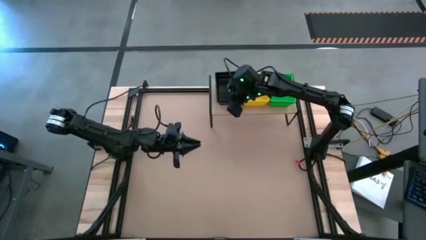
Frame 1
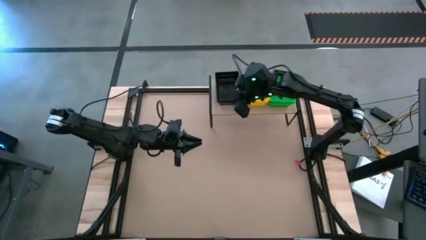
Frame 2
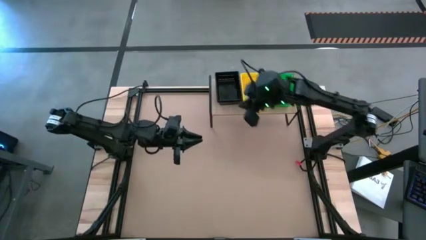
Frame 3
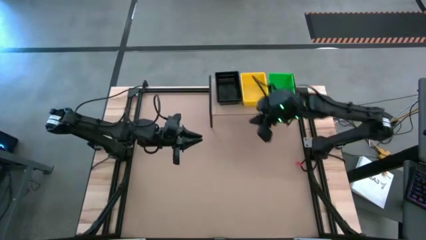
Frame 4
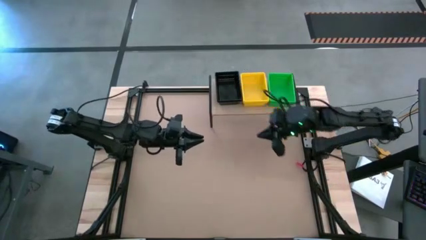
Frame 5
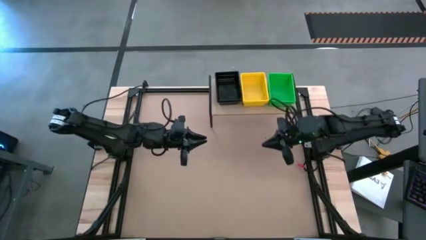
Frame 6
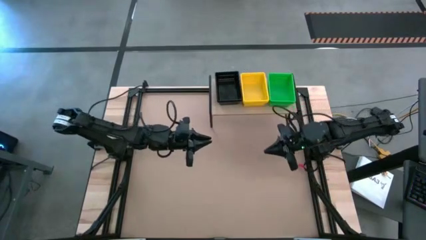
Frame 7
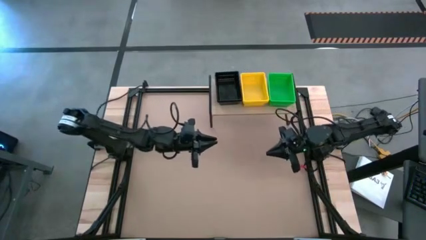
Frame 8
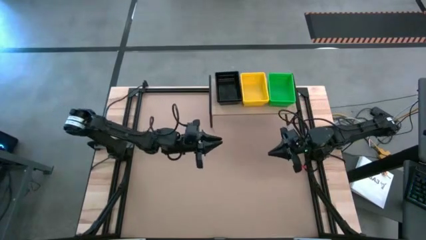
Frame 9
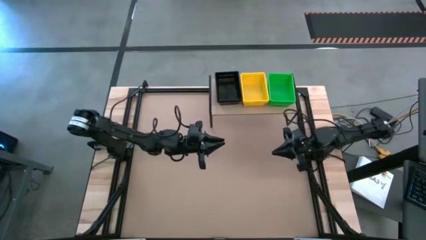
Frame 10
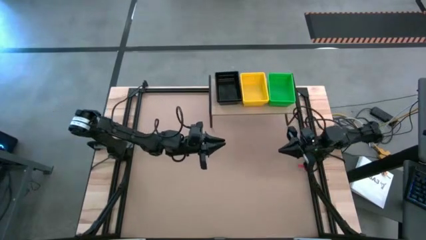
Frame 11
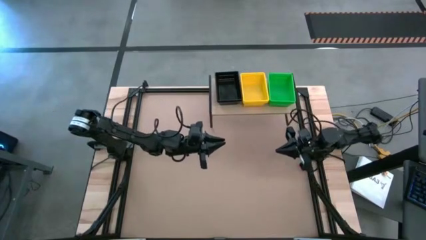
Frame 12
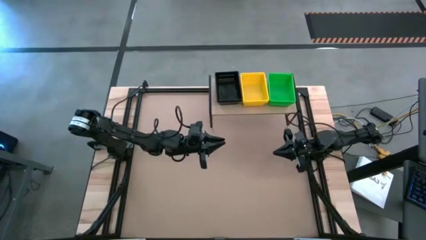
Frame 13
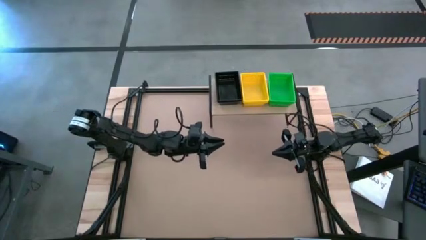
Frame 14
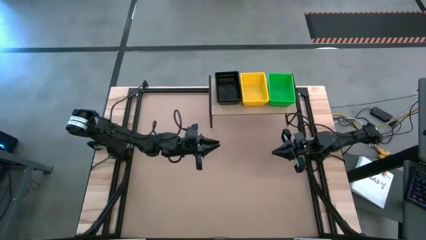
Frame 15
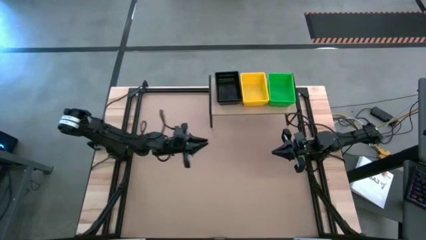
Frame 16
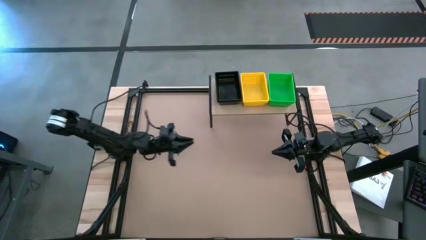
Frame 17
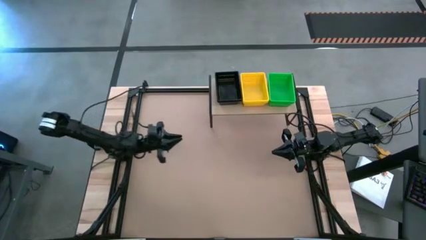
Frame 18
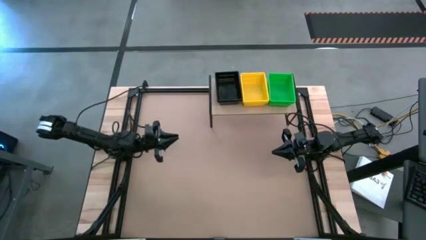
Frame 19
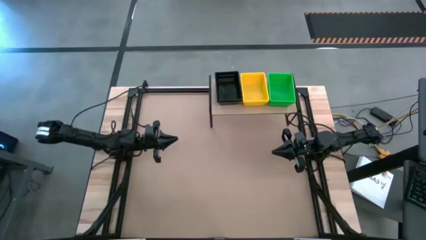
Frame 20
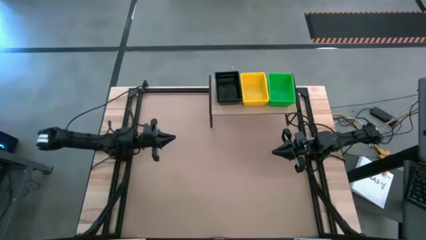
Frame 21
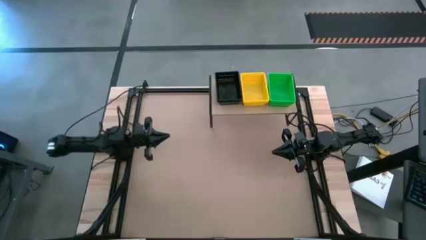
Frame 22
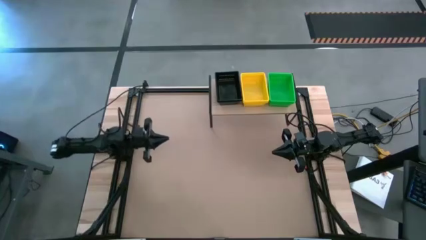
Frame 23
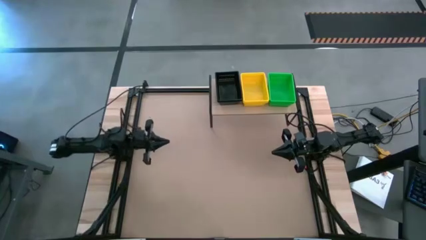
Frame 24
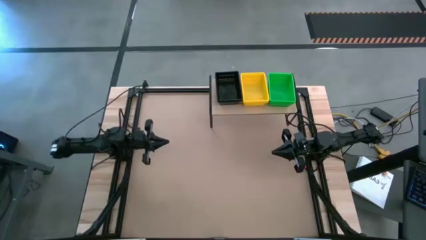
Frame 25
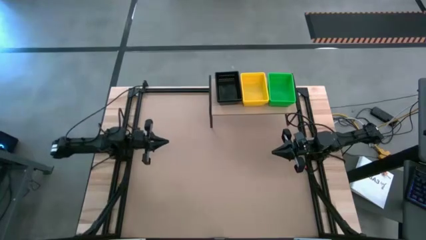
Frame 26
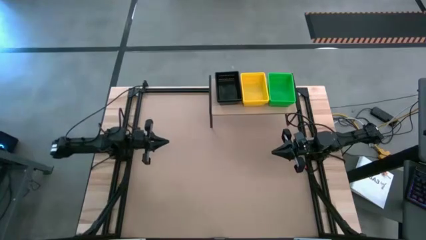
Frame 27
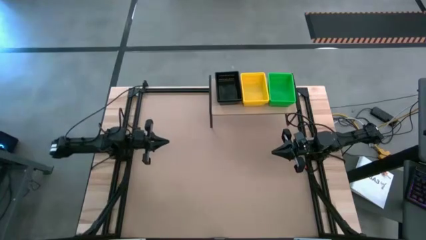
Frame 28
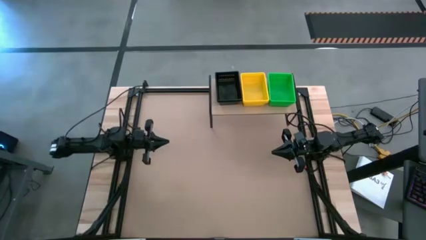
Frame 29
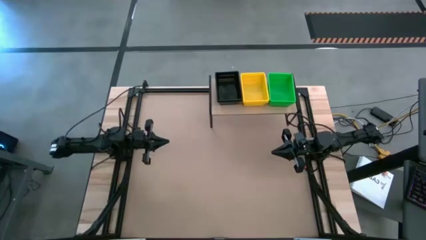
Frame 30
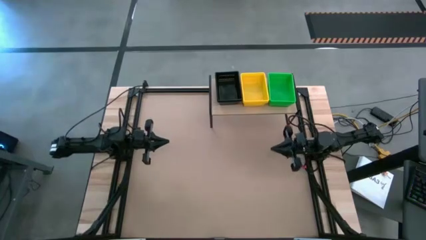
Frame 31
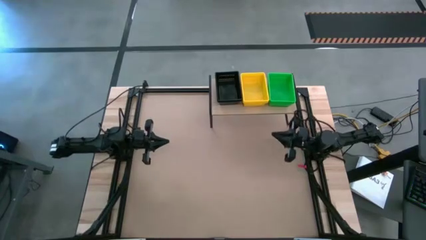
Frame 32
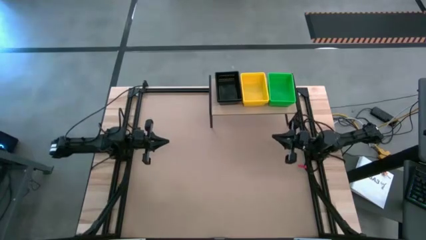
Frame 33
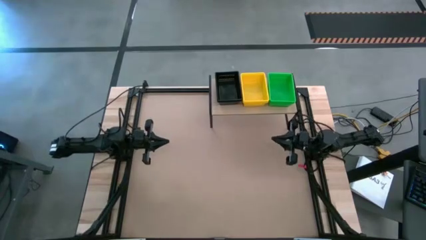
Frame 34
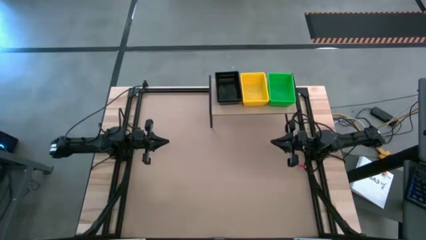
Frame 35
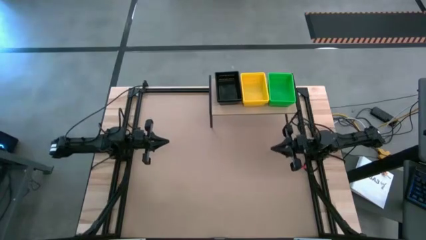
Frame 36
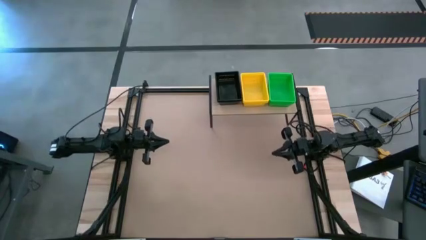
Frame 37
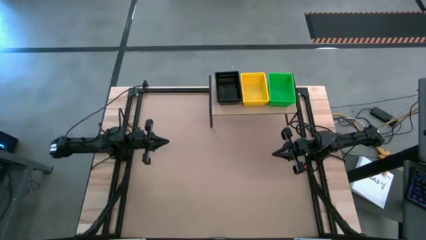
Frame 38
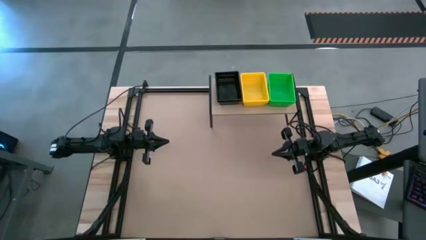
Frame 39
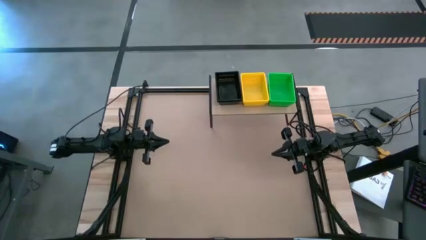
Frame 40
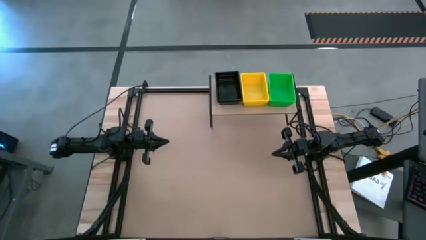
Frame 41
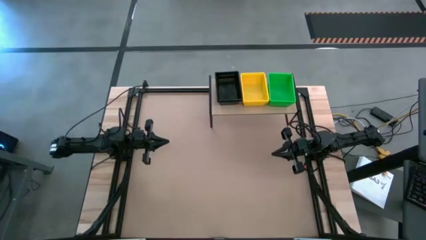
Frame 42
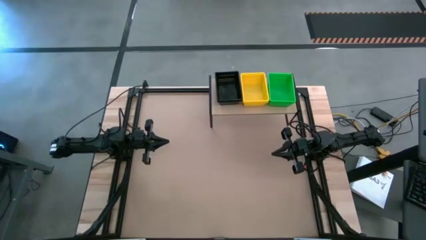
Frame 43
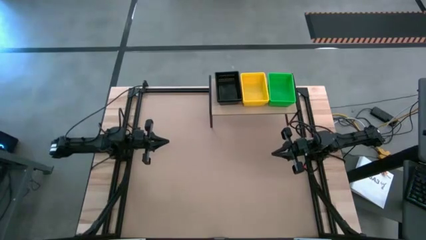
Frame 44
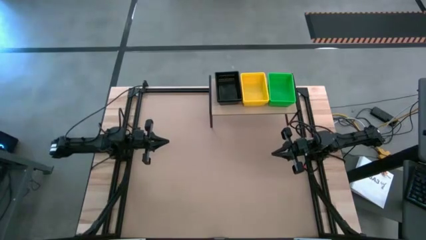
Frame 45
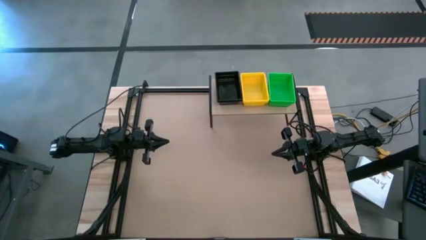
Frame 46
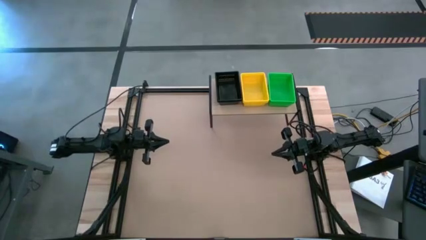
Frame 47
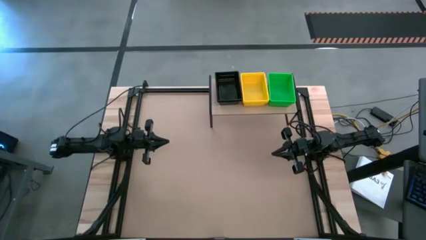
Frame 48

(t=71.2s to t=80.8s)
Task: Stack baskets on shelf by color
Return to Home Position

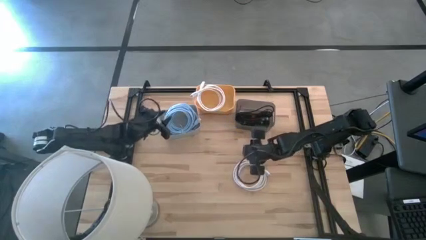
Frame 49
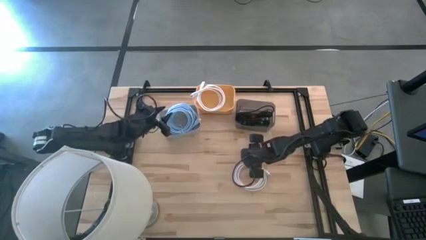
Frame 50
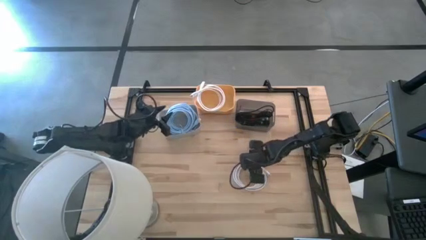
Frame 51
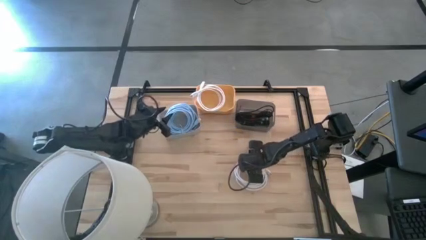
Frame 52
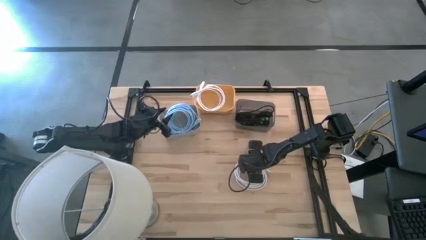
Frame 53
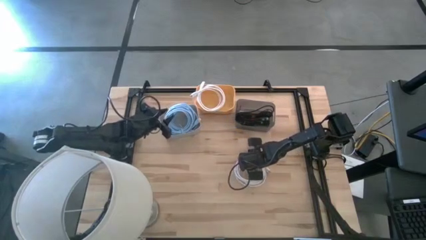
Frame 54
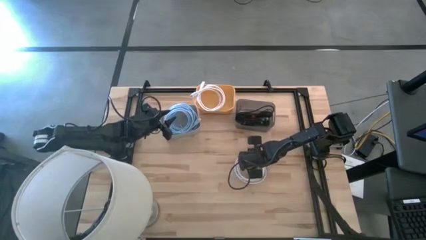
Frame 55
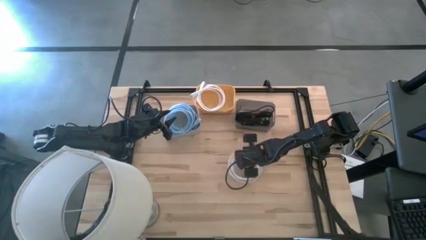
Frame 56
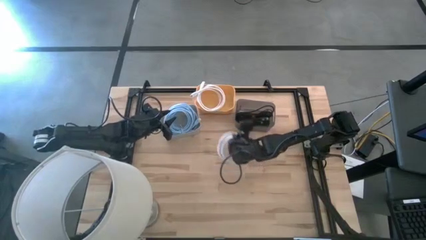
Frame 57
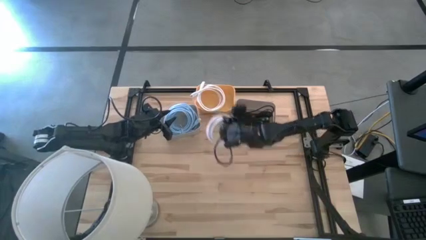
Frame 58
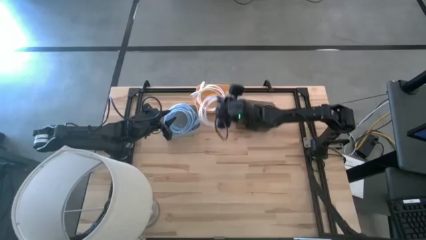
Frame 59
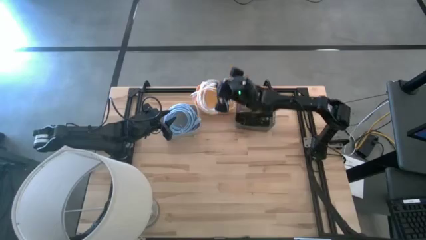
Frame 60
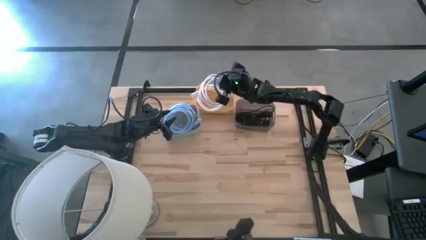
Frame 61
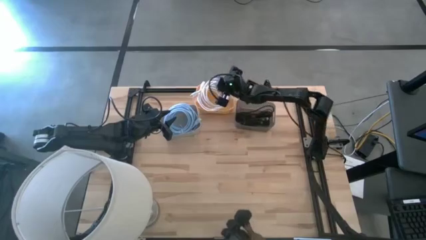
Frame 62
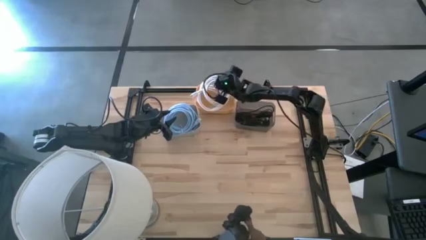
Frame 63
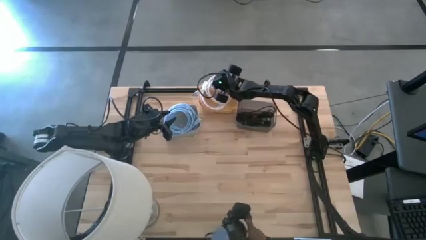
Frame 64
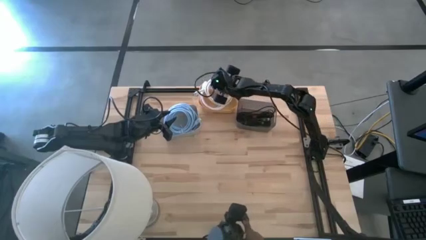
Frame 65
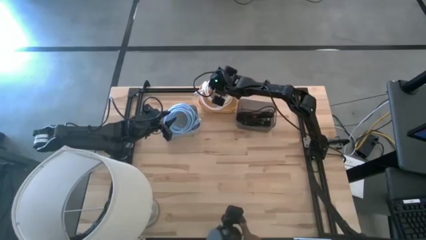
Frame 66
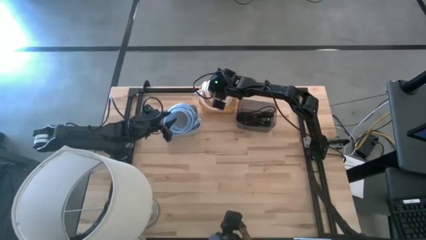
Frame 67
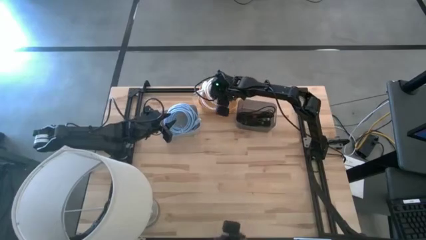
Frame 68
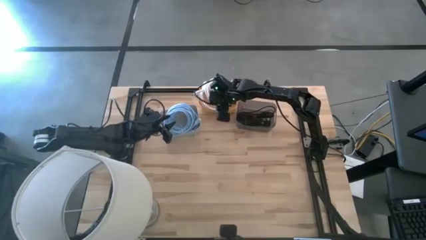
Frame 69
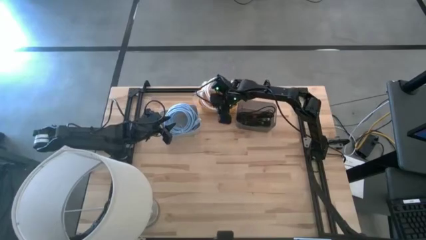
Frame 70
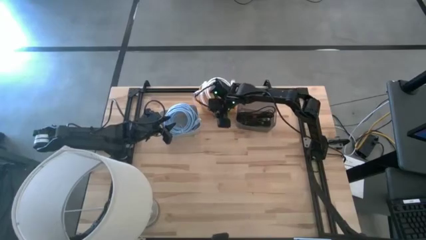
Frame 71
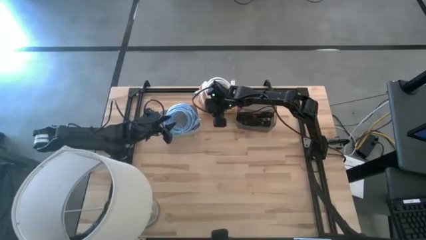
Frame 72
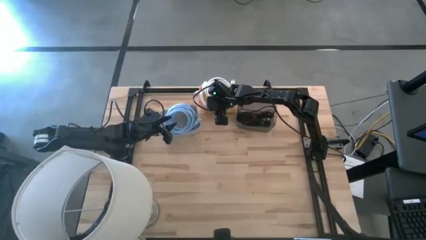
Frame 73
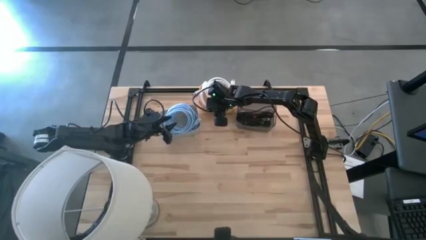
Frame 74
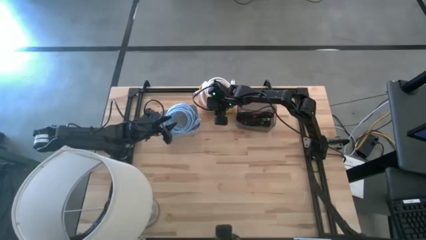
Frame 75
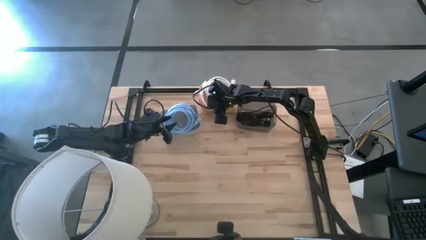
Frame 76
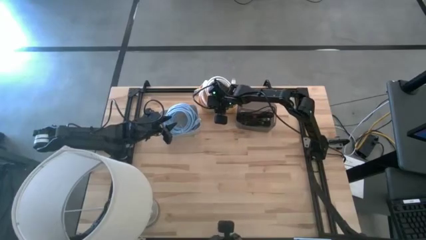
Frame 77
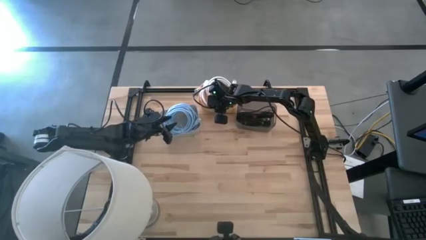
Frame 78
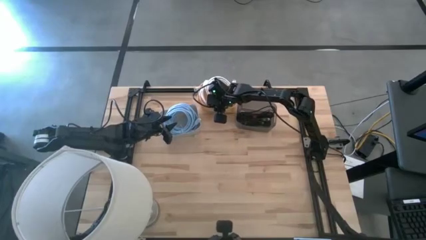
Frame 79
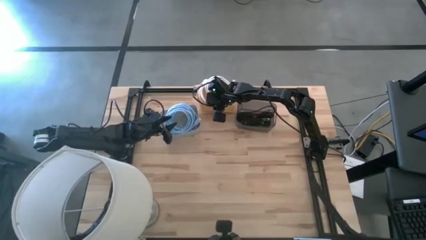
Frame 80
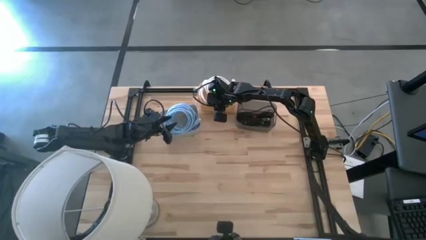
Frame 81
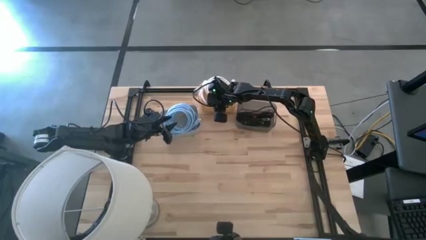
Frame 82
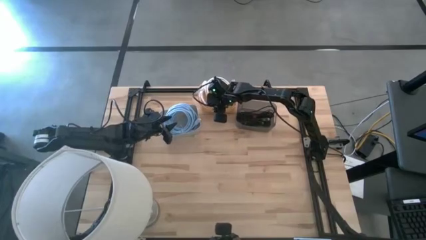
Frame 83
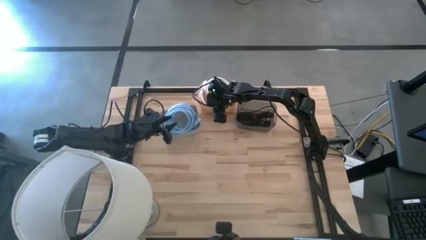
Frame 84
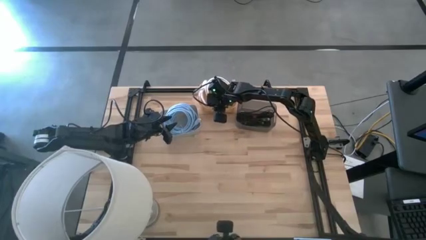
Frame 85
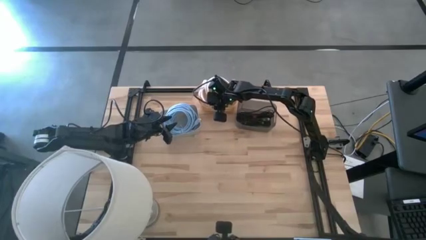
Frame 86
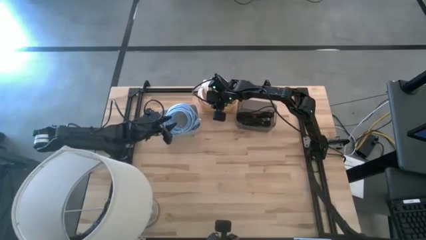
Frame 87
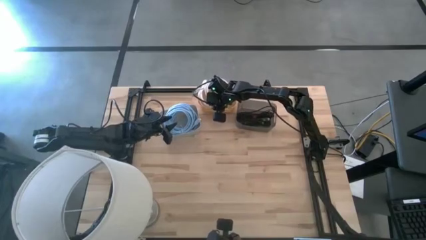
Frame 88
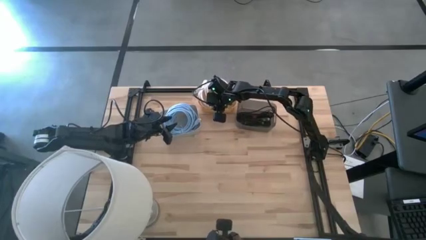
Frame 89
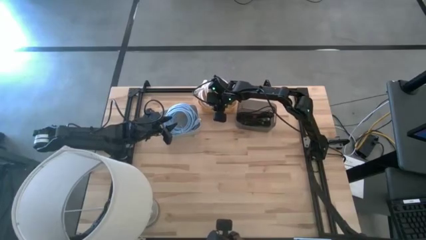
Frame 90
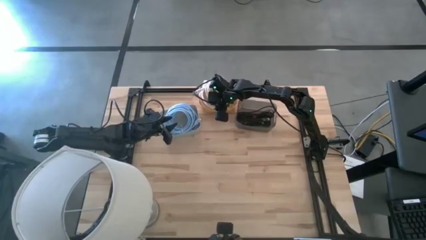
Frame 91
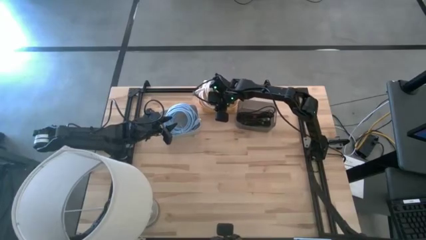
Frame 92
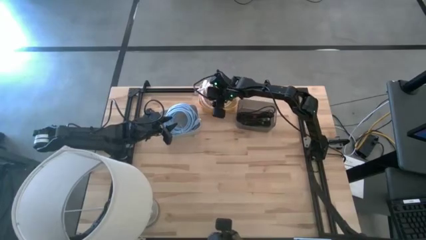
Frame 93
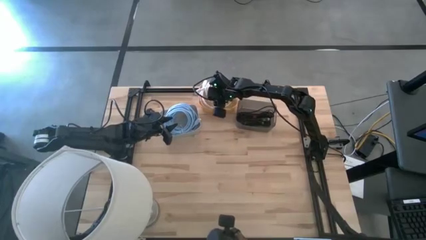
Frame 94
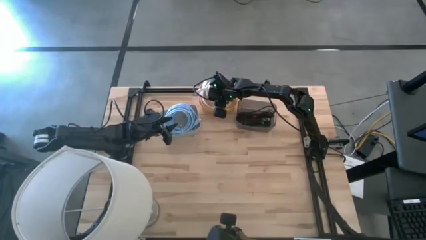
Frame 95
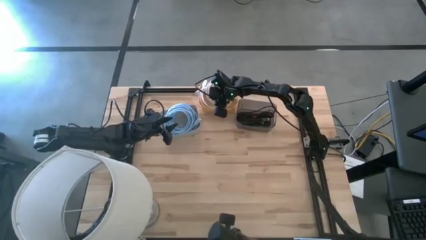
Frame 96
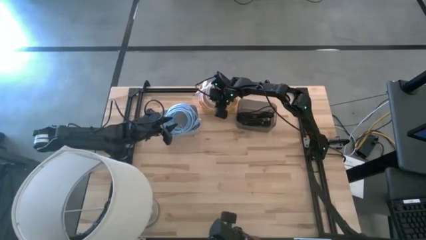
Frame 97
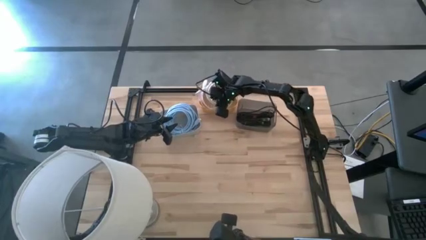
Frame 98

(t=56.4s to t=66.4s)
Task: Pick & Place USB Port
Put the white hdmi cable into the yellow bin
